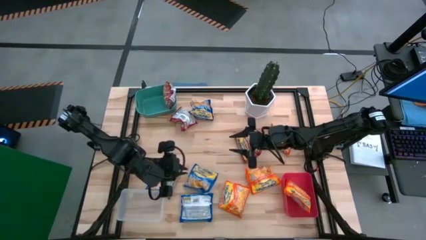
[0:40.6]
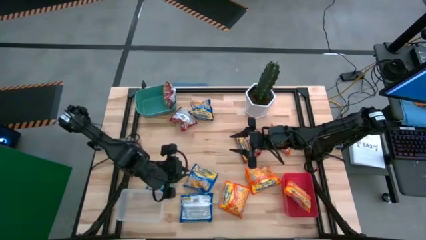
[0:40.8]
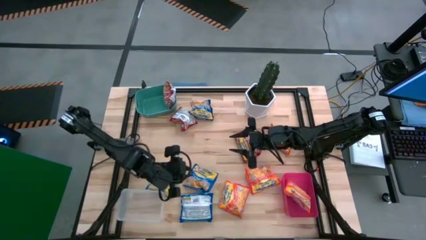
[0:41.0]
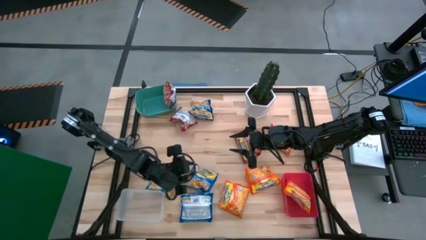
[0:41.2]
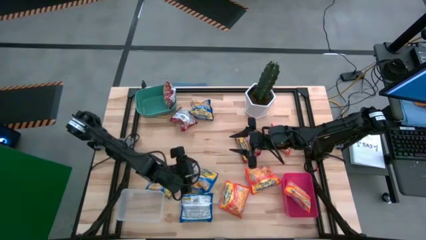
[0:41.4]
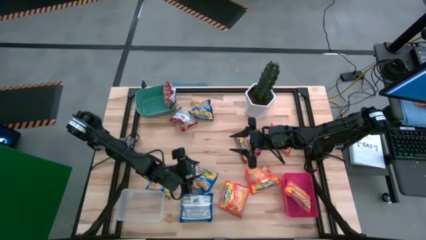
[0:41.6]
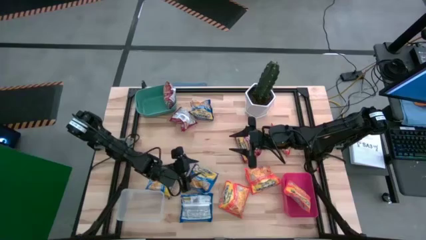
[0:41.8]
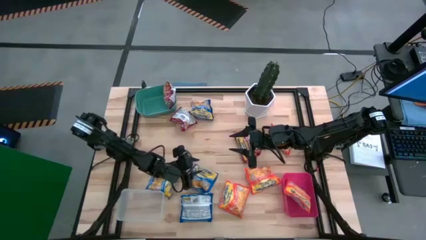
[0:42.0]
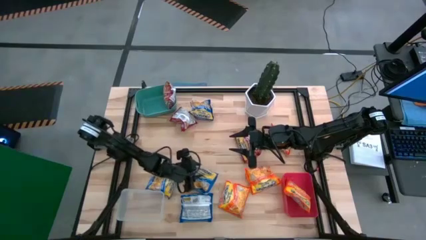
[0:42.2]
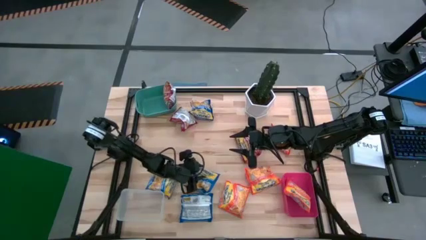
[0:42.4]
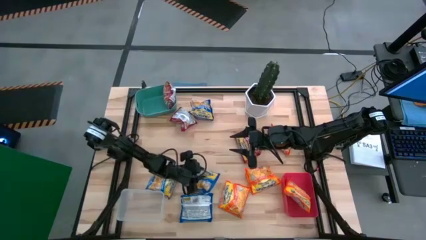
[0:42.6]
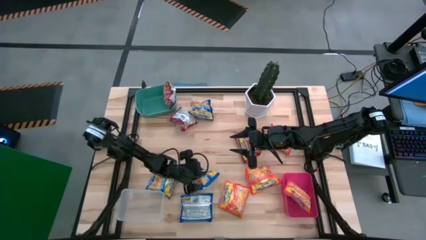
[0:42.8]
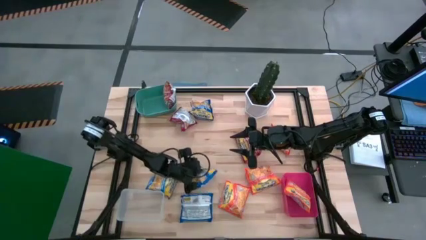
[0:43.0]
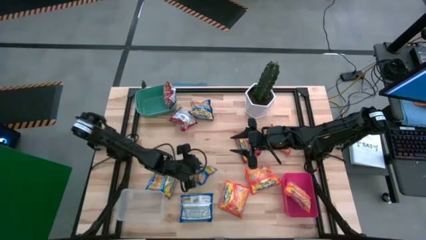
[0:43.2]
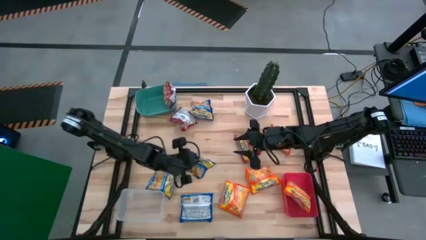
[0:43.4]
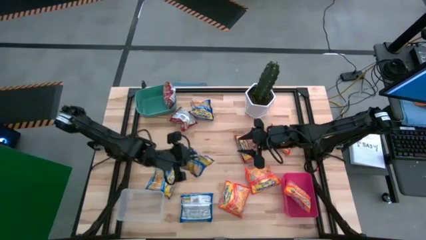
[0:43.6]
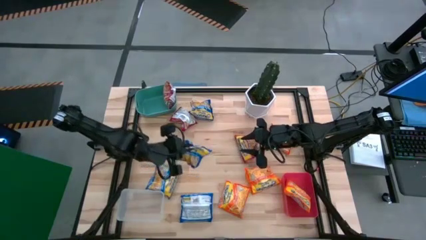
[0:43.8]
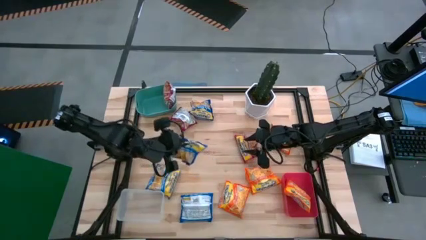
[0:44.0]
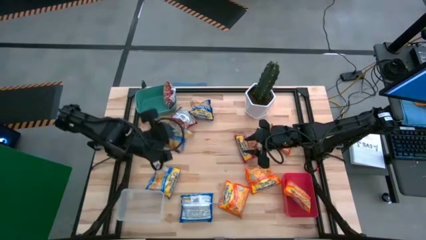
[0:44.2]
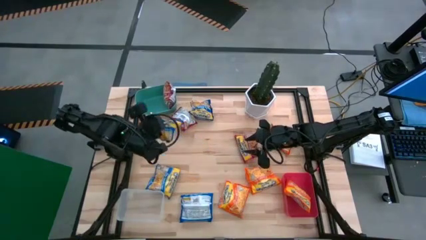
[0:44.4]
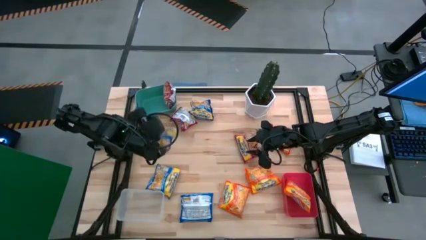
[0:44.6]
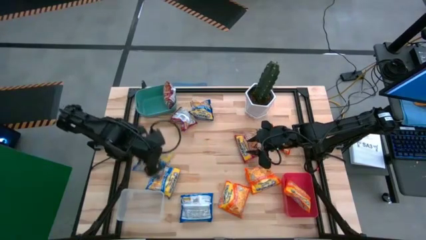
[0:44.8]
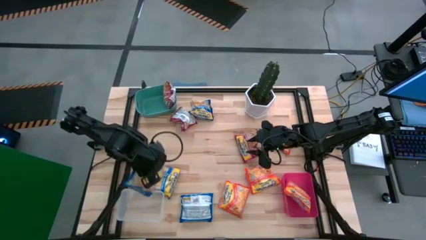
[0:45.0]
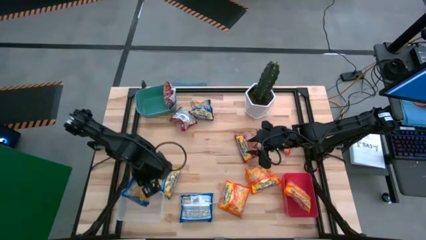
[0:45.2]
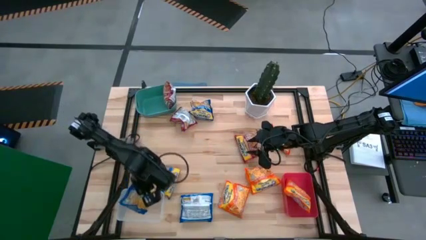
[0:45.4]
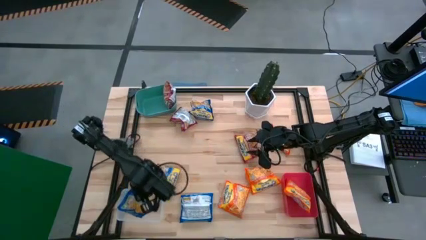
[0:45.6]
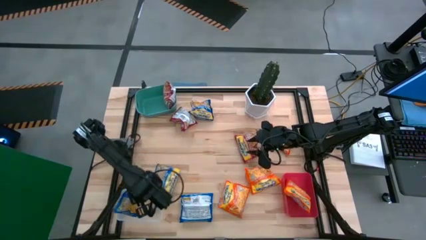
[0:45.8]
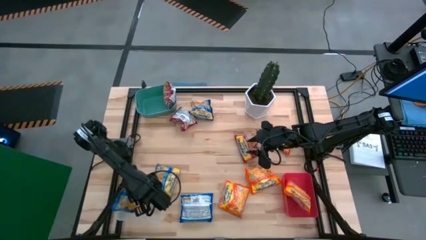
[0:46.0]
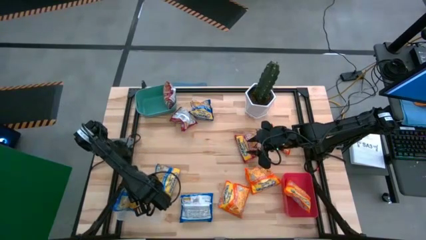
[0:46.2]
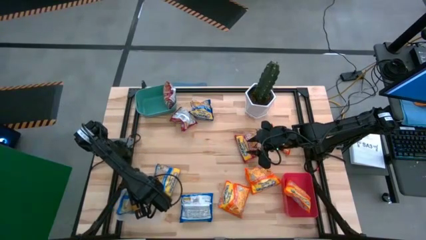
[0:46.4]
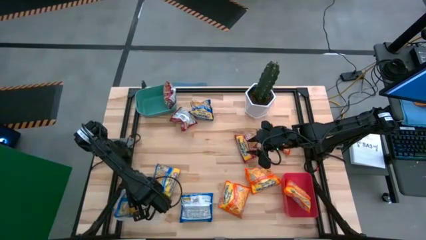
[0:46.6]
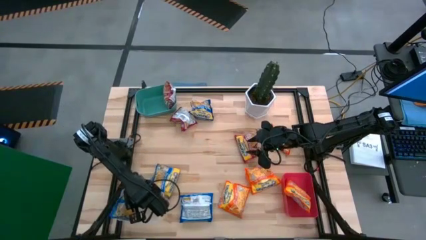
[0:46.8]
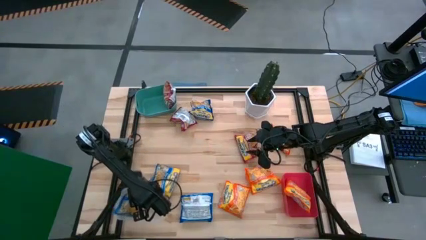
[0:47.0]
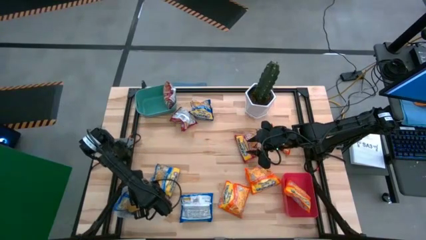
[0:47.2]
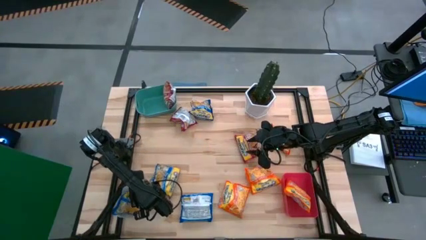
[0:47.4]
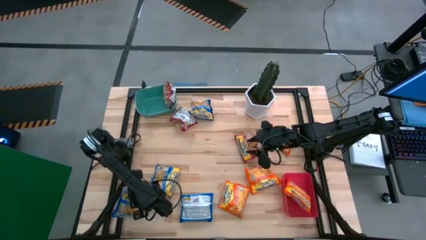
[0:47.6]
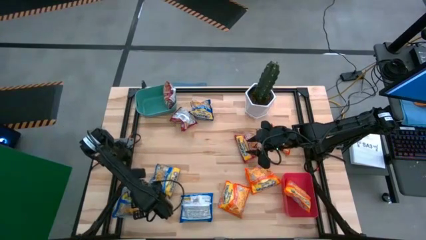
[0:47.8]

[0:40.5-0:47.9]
Task: Sort Maruchan noodles
Put the middle right blue noodle pack into the transparent bin

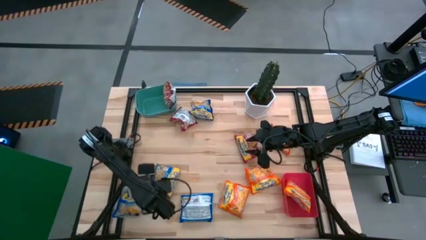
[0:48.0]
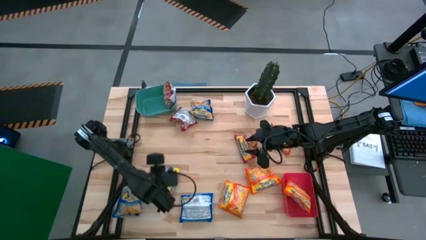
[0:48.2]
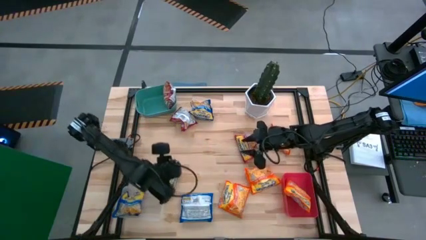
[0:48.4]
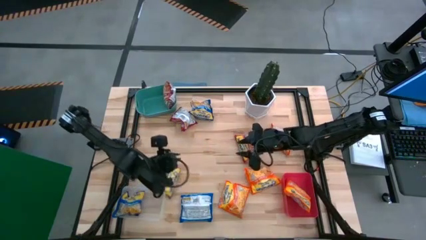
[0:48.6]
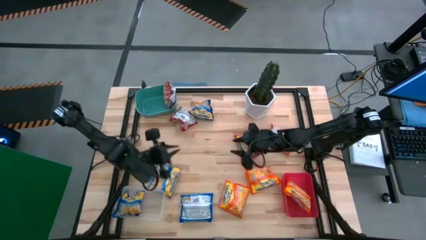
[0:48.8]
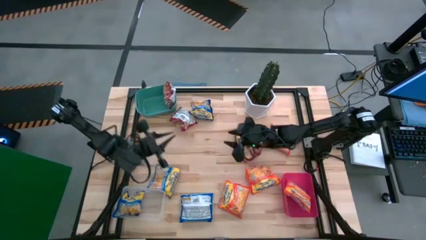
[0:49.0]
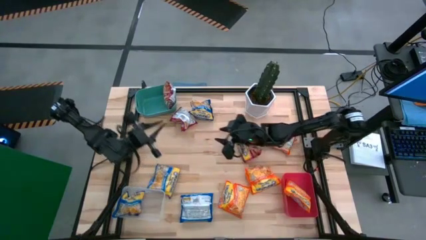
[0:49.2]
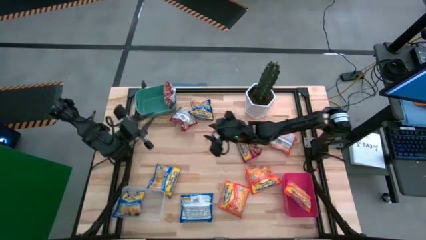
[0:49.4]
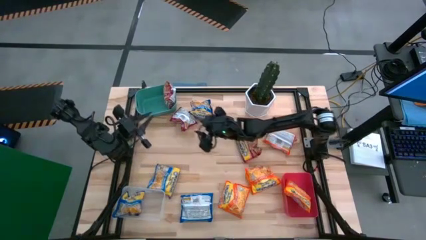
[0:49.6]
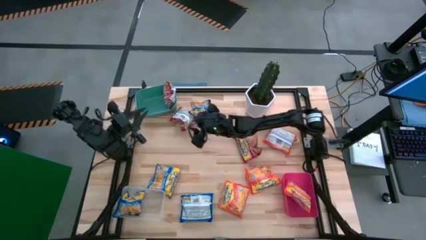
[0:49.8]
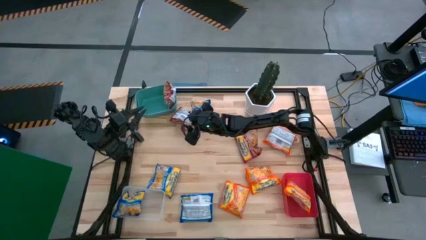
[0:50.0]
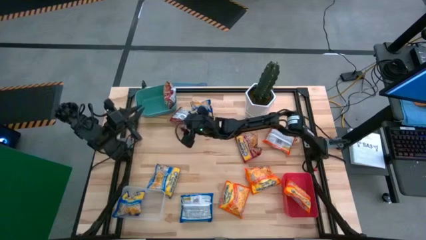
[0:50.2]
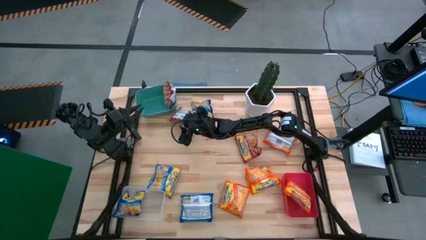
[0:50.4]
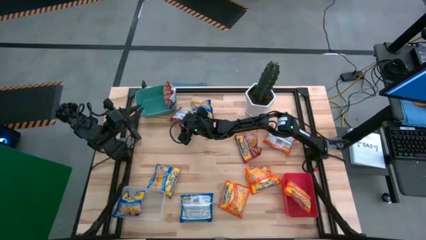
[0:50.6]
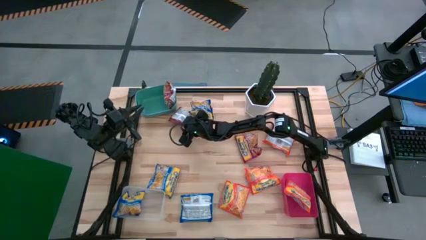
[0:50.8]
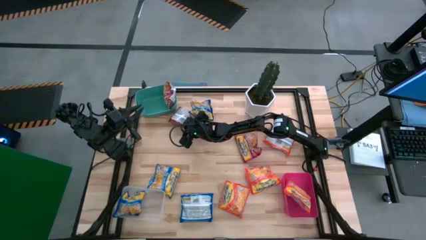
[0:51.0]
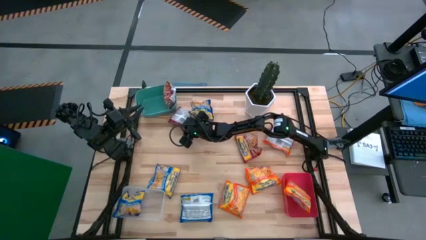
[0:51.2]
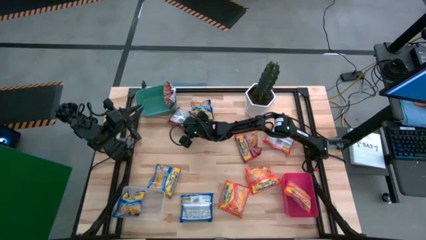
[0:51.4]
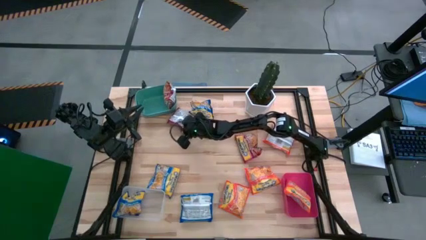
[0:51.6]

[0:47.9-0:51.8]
Put the left red noodle pack into the green bin

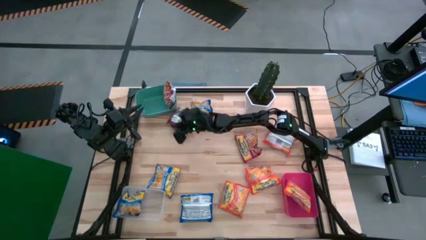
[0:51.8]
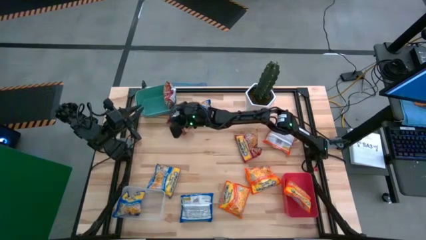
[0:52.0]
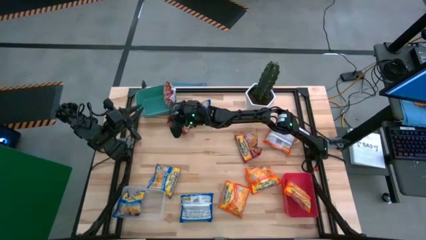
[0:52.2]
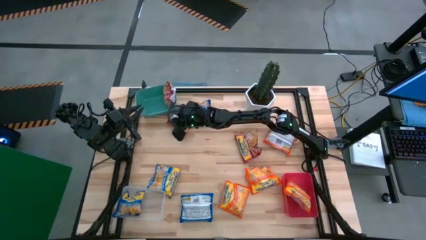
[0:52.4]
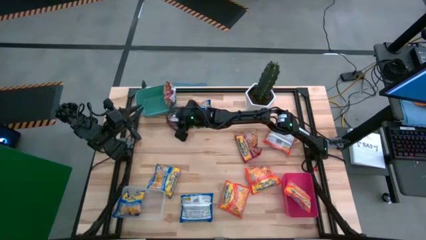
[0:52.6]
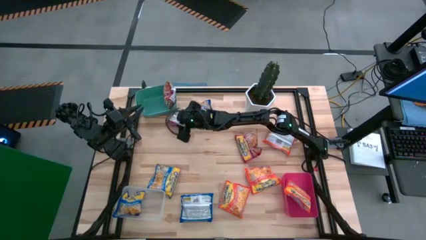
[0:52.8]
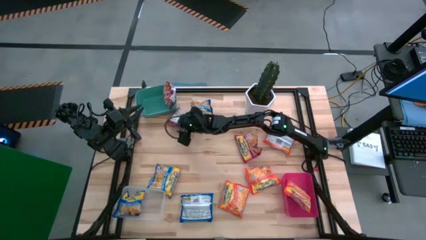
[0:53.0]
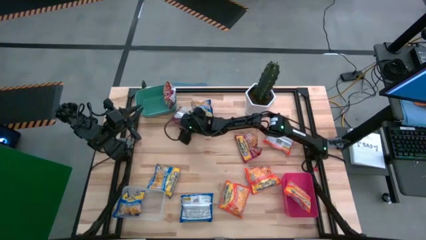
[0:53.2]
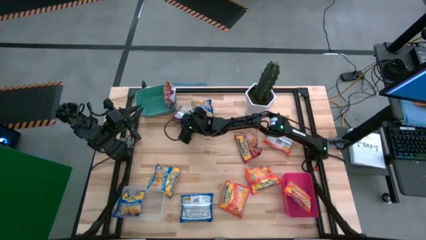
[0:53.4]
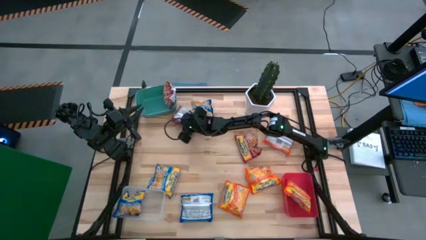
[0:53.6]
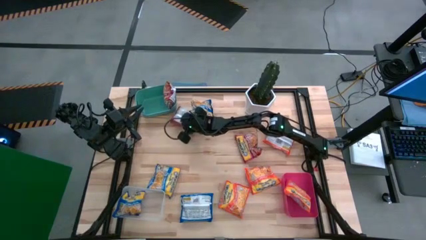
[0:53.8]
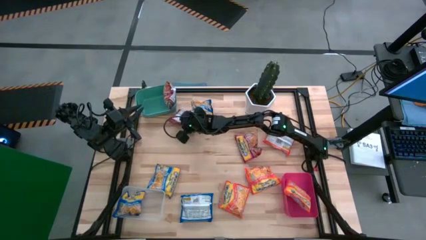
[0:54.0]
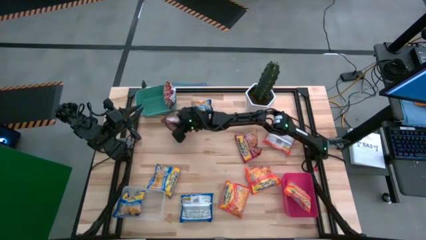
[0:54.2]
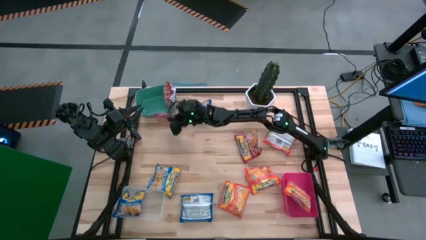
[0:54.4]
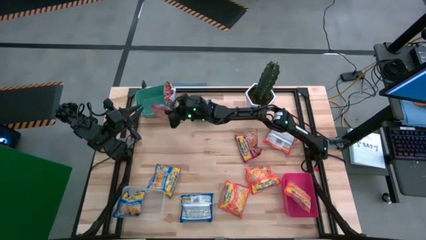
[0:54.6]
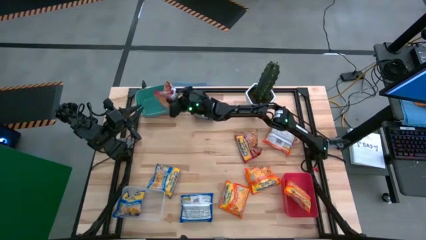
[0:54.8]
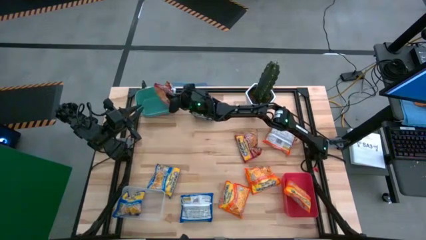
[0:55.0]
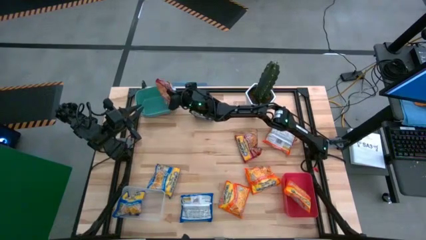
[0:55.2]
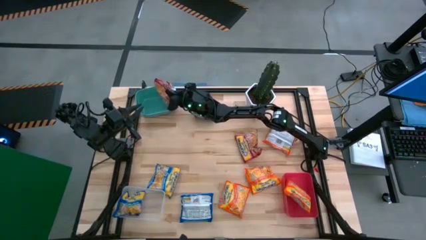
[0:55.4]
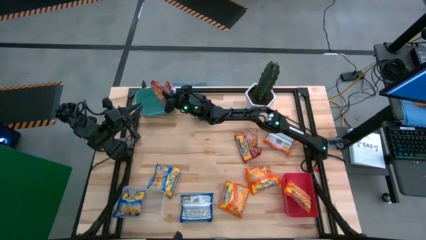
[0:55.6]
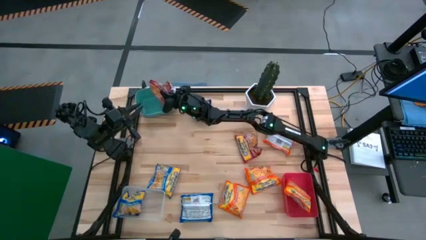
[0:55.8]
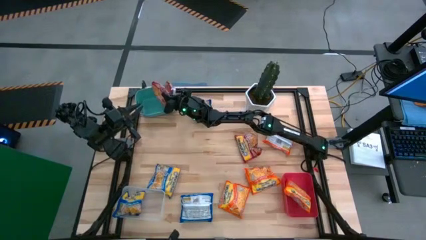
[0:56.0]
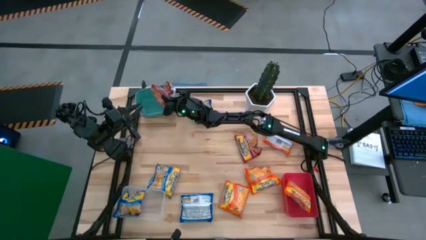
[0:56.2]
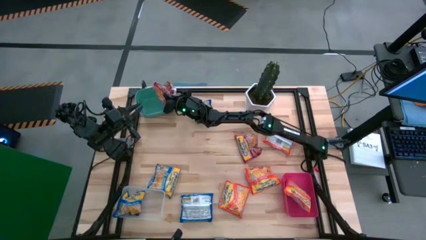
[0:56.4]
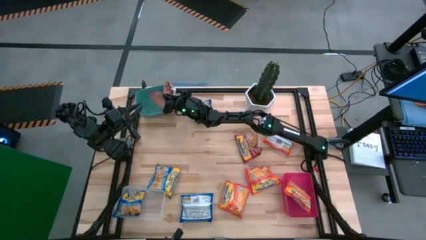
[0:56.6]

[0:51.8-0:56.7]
Put the left red noodle pack into the green bin

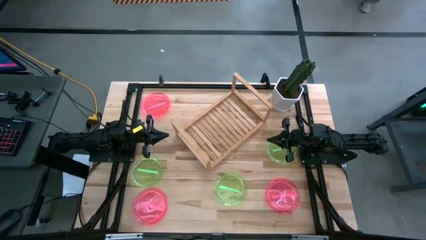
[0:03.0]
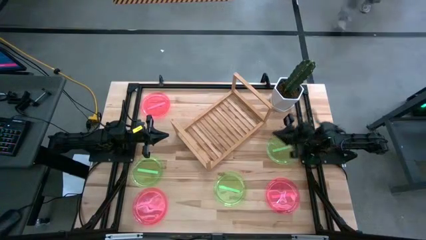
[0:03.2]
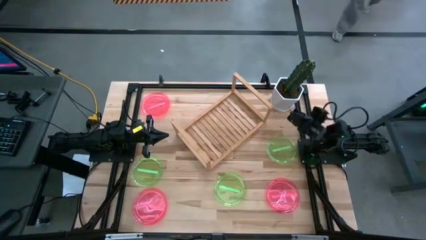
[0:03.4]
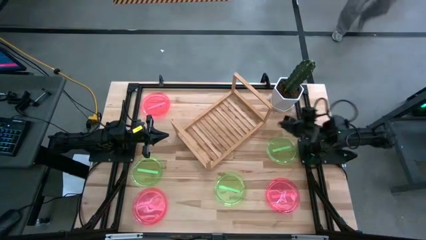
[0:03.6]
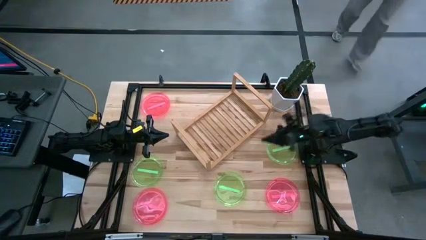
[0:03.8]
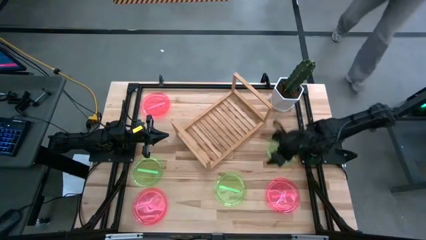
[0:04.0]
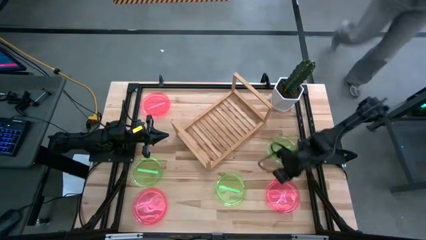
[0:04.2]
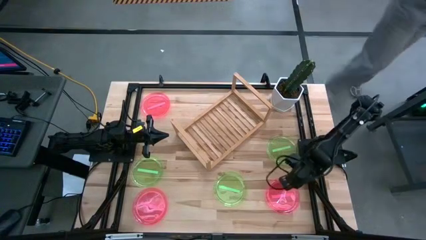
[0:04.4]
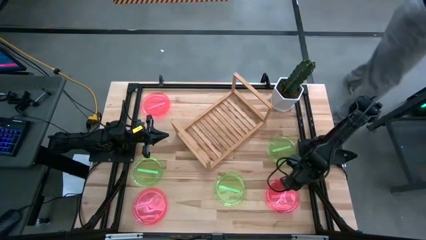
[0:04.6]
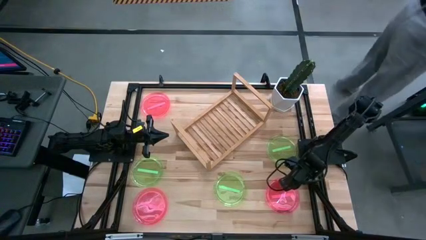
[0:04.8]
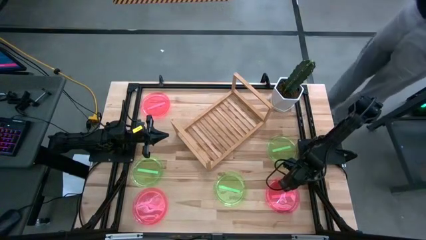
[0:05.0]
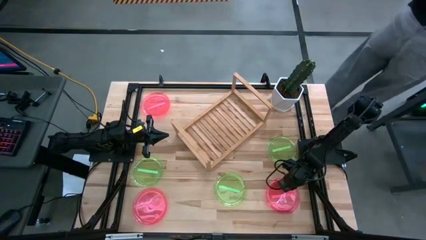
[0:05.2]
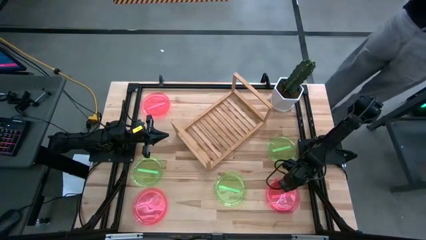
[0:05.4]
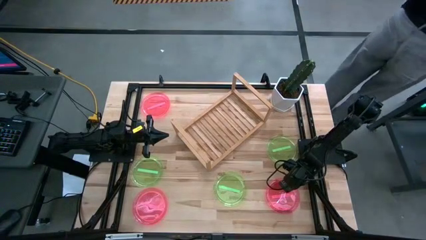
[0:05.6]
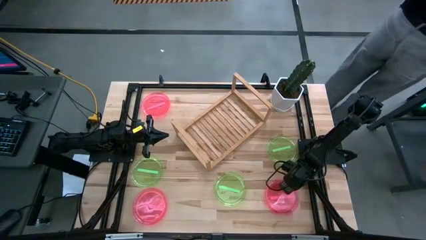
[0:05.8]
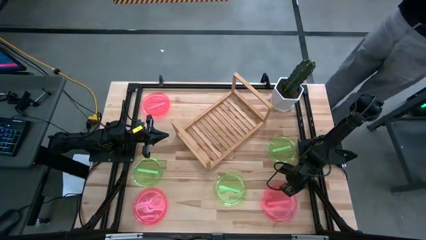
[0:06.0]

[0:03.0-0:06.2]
Task: Place and stack plates onto a shelf
Put the bottom right pink plate on the shelf
